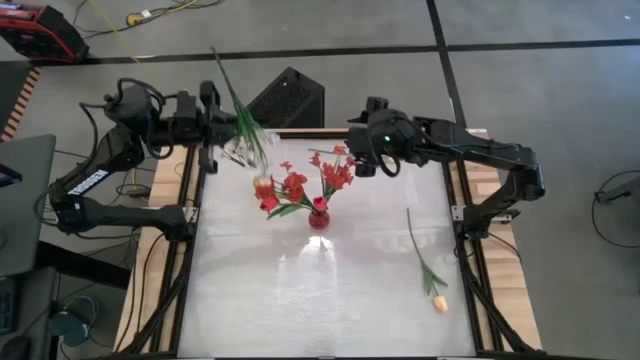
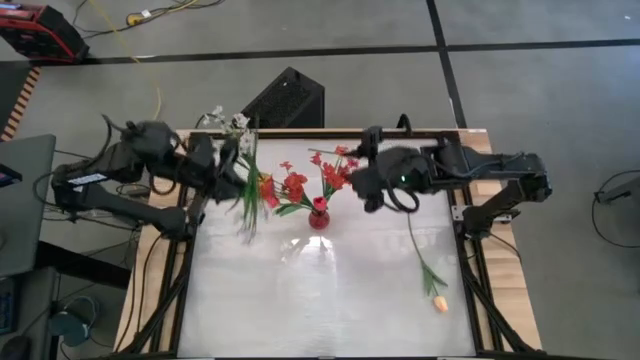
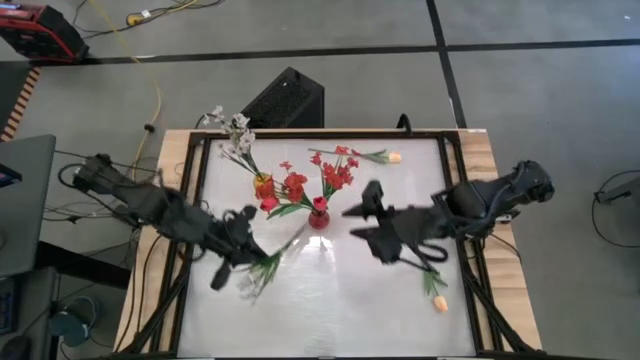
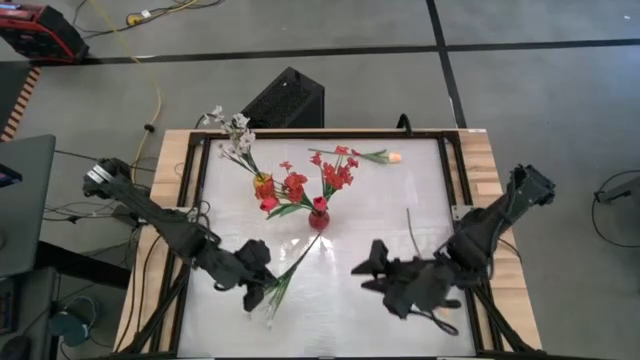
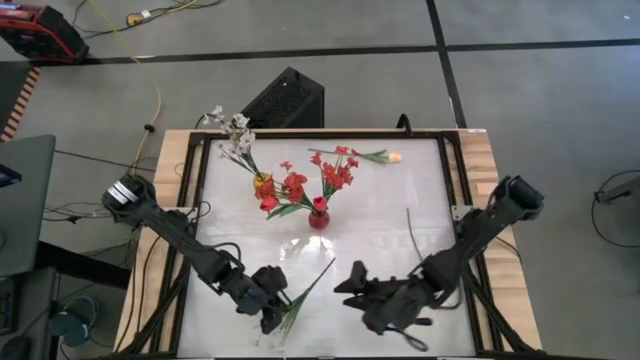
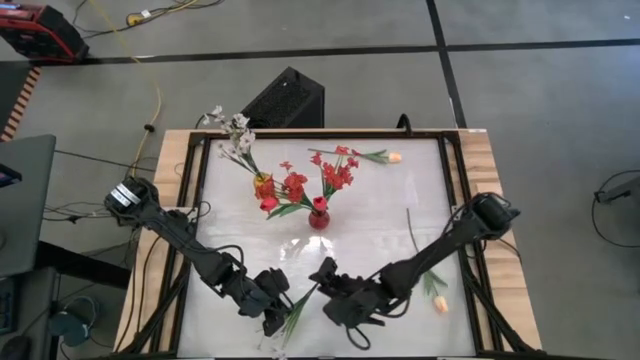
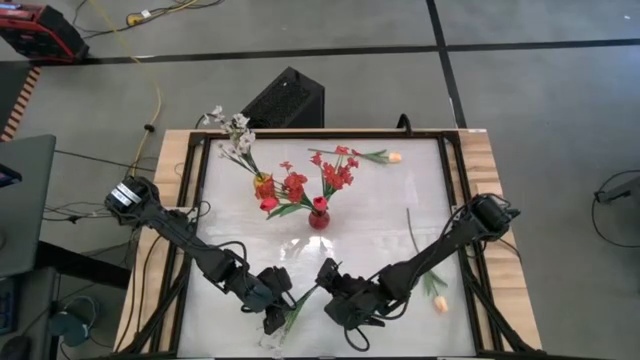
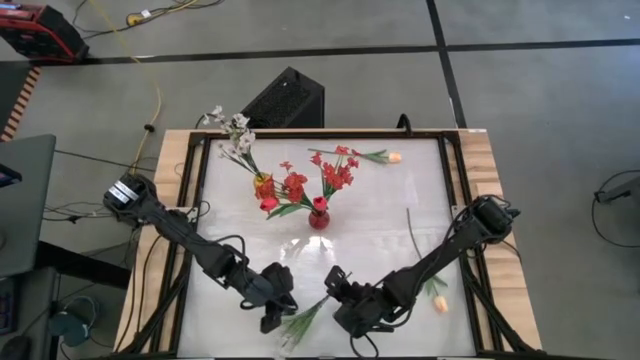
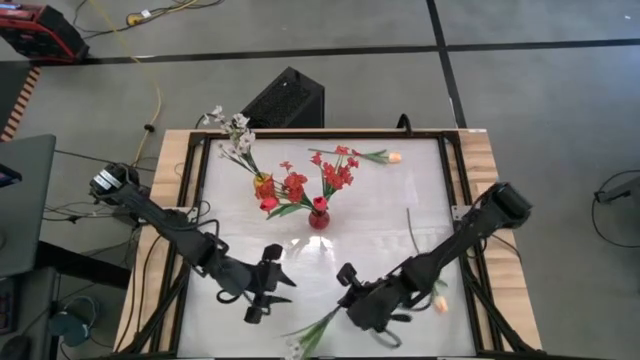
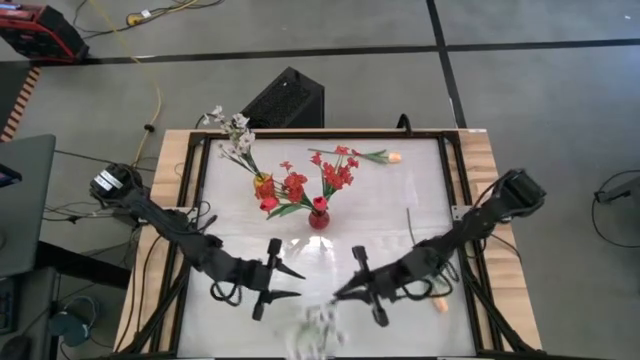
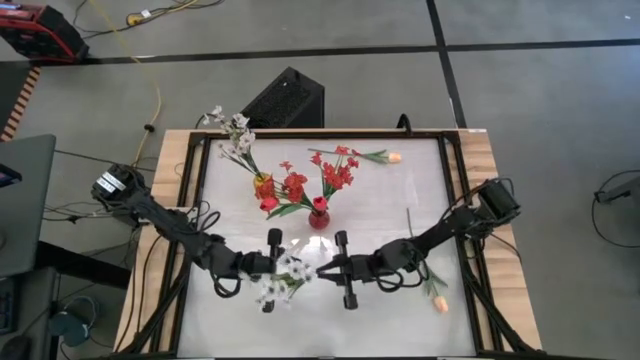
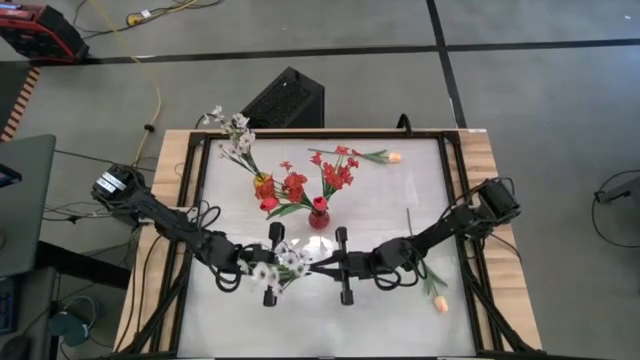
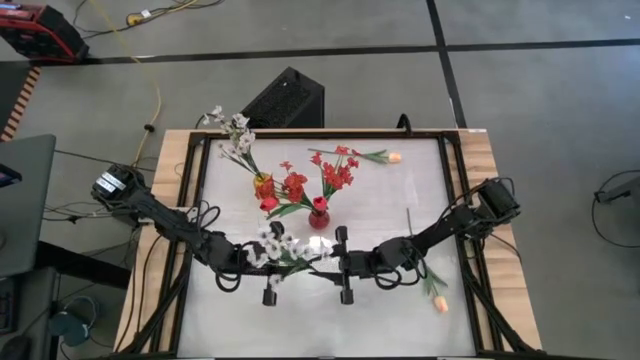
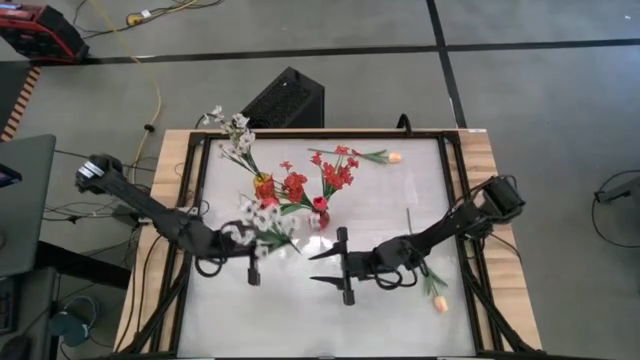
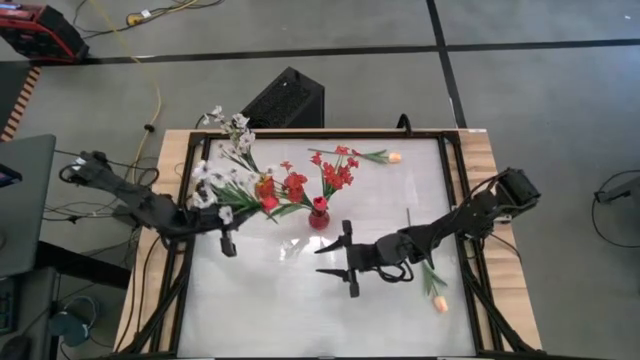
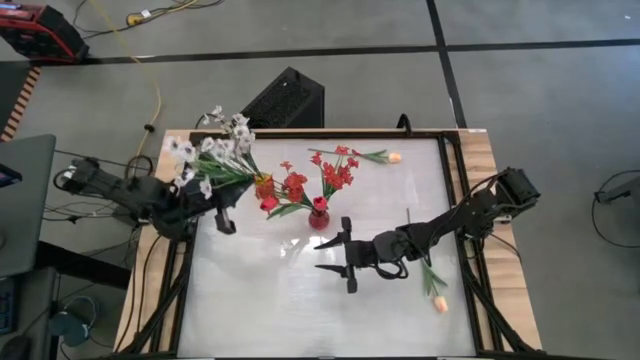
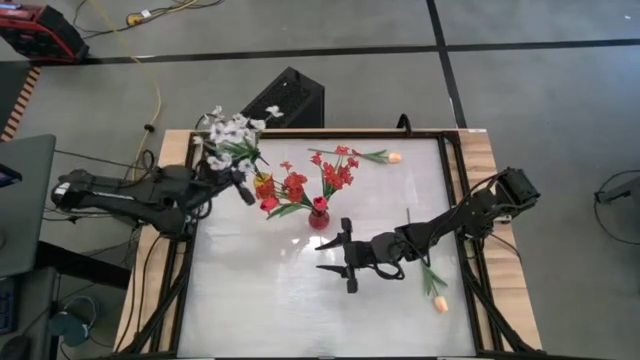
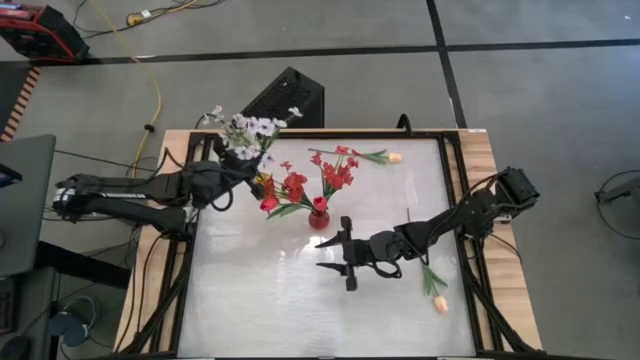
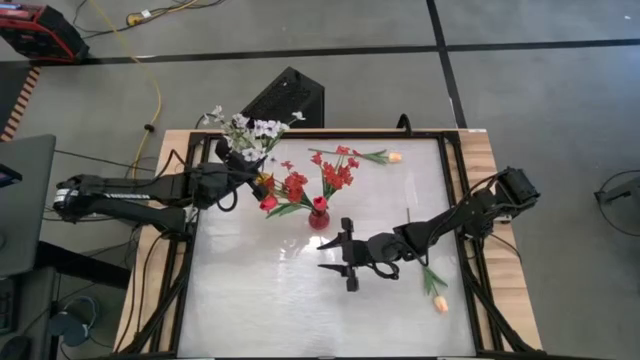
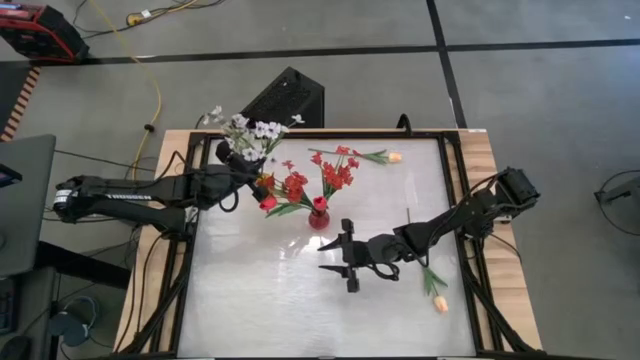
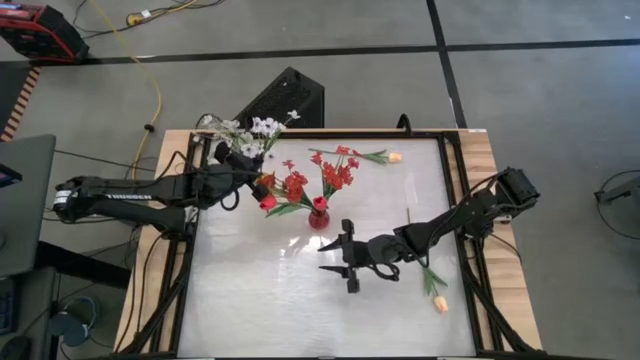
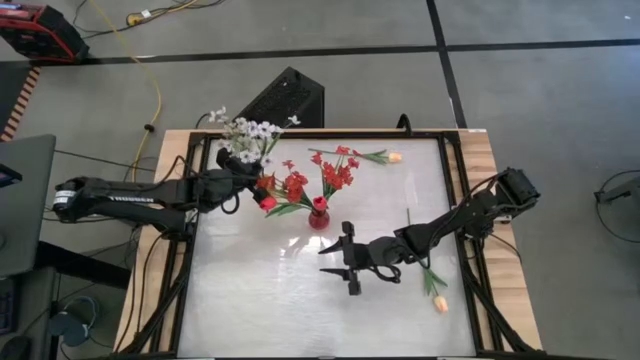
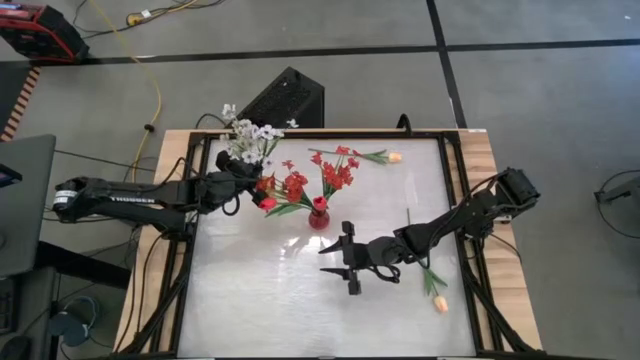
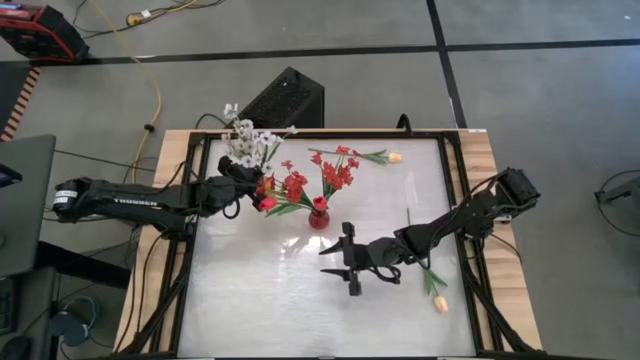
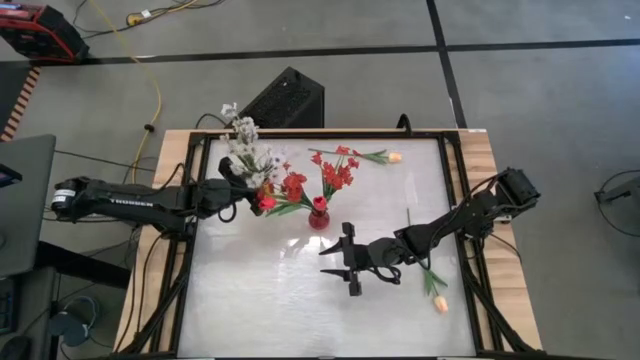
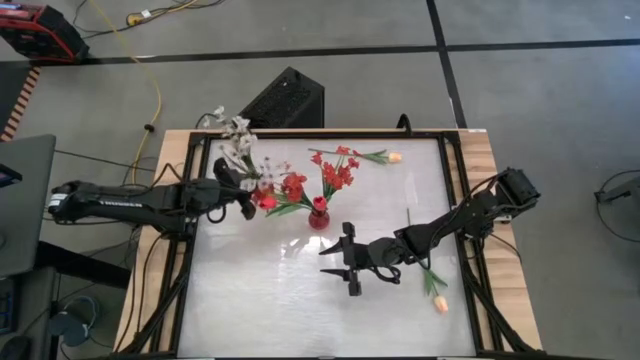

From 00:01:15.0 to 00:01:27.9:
Task: Sort flowers into vase by color
Put the white flowers into the yellow vase

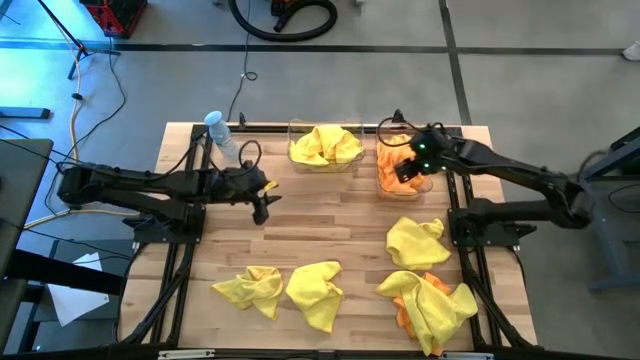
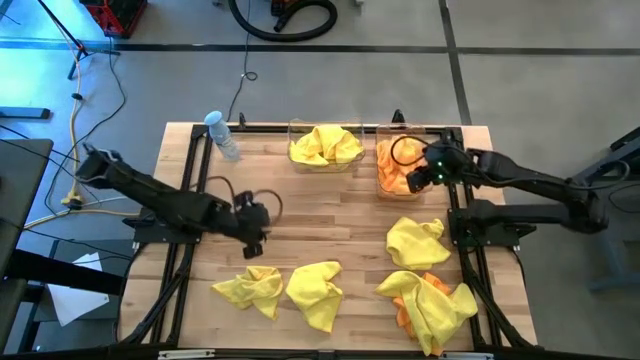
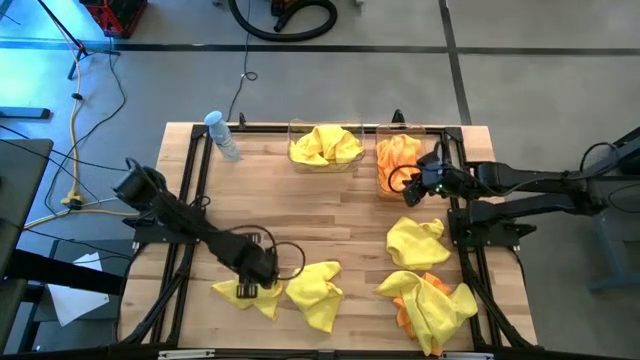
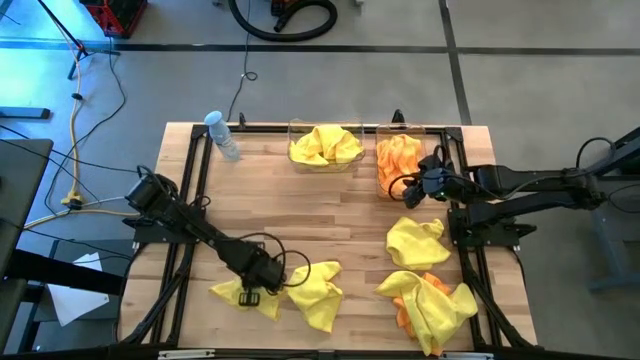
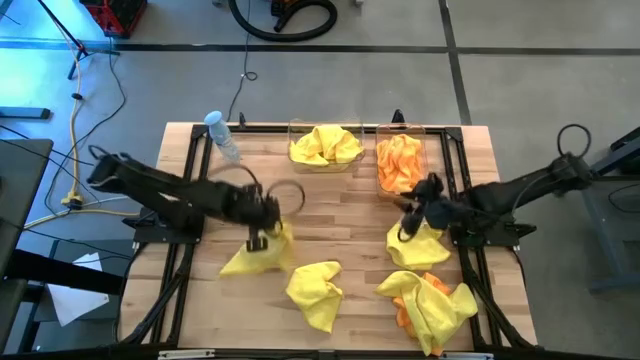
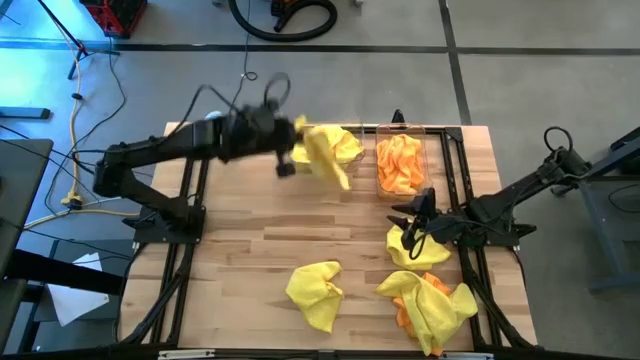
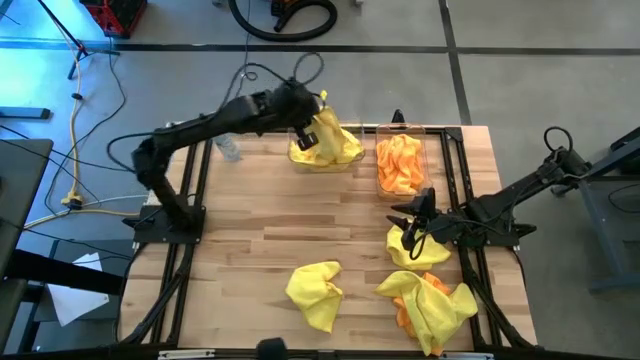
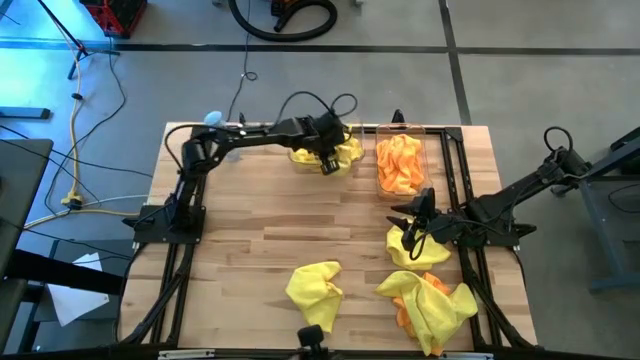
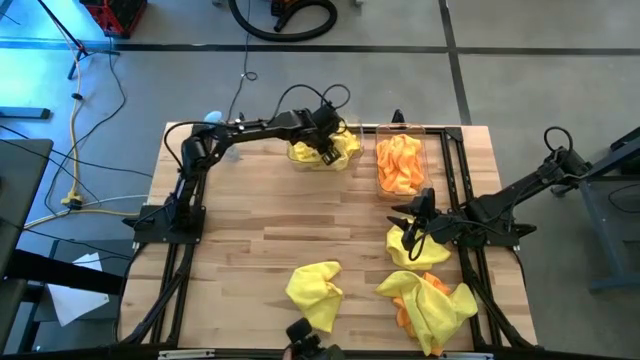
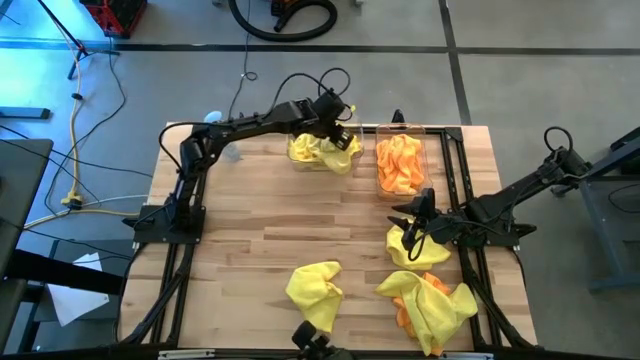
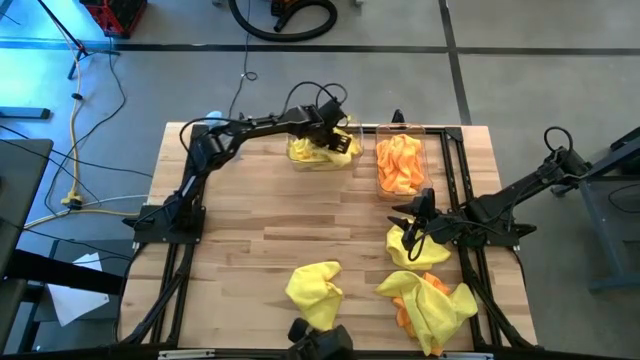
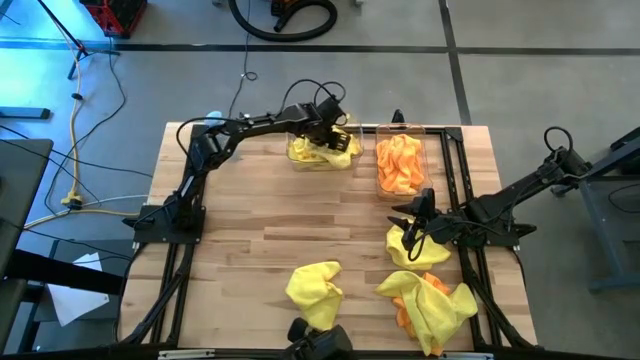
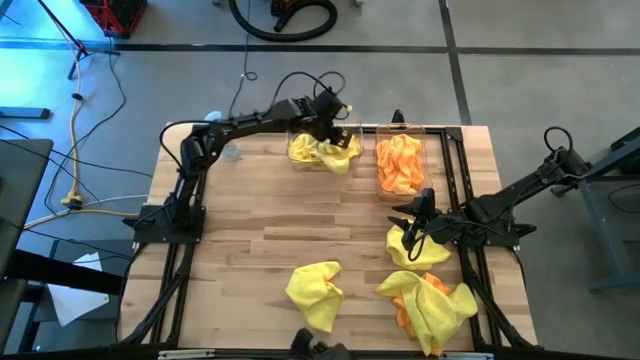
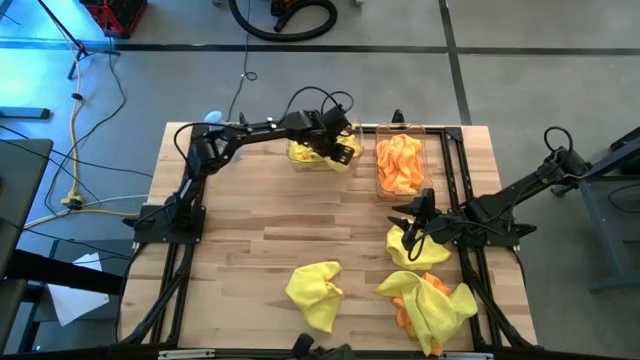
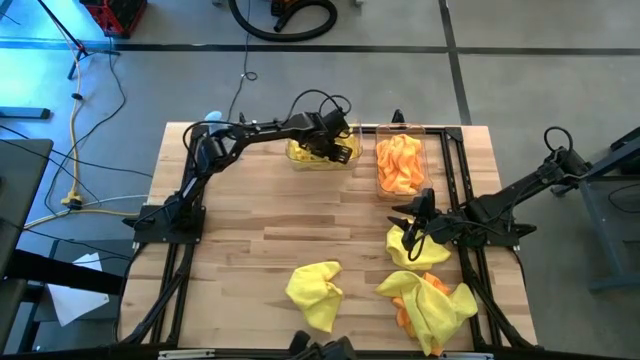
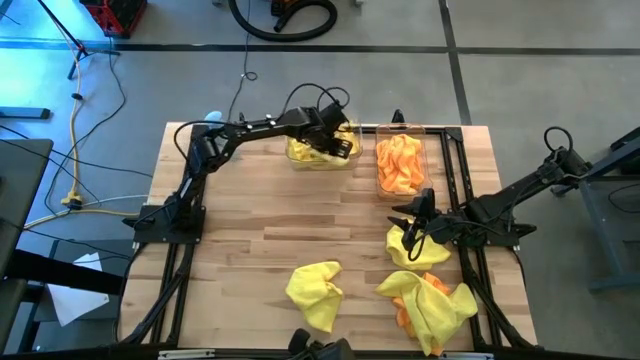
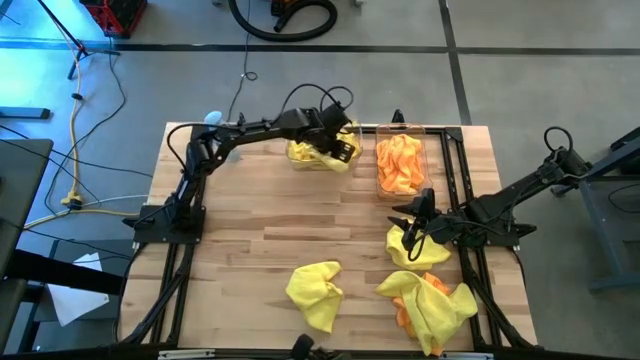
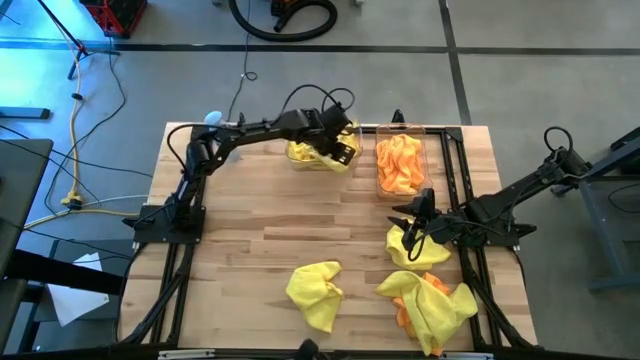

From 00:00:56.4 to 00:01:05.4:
Task: Sort microfiber towel by color & place in baskets
Put the yellow microfiber towel into the left transparent bin
